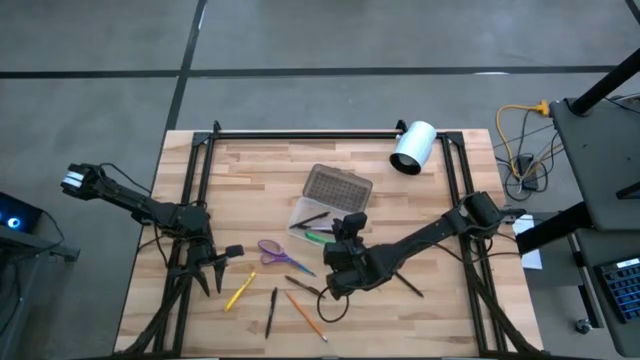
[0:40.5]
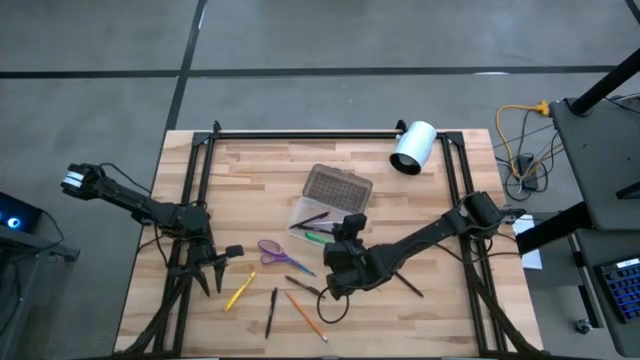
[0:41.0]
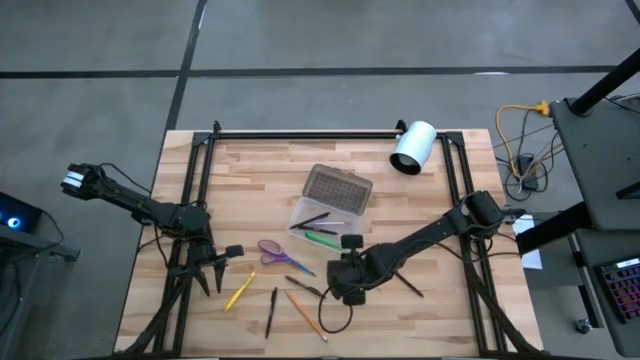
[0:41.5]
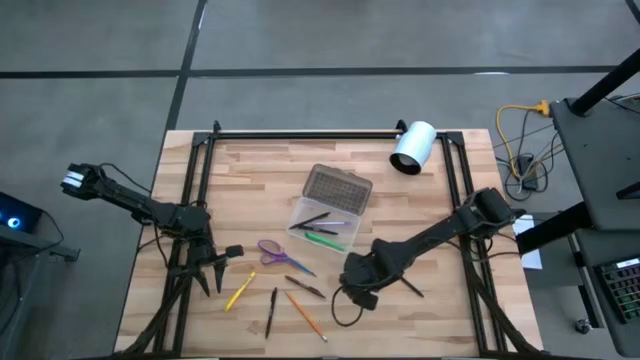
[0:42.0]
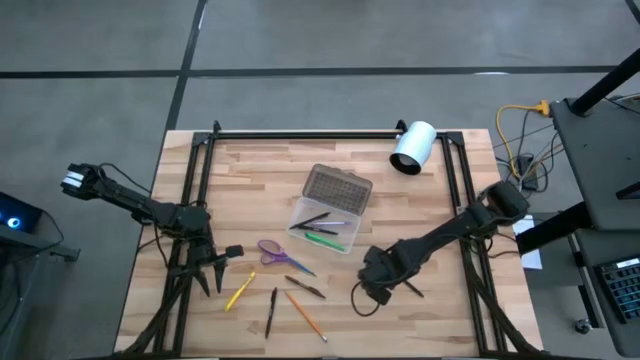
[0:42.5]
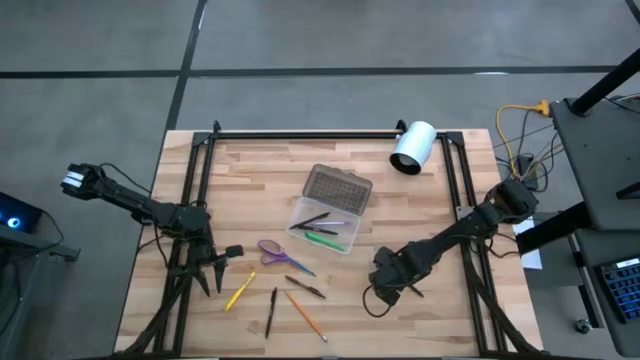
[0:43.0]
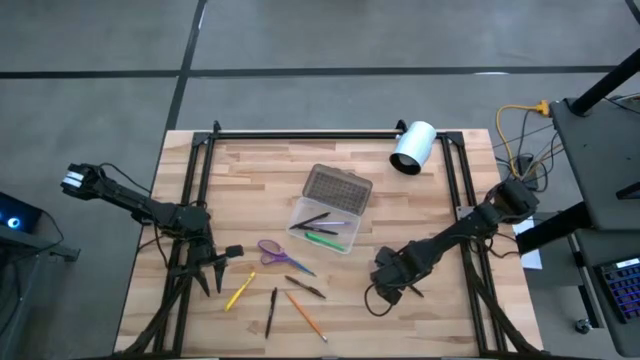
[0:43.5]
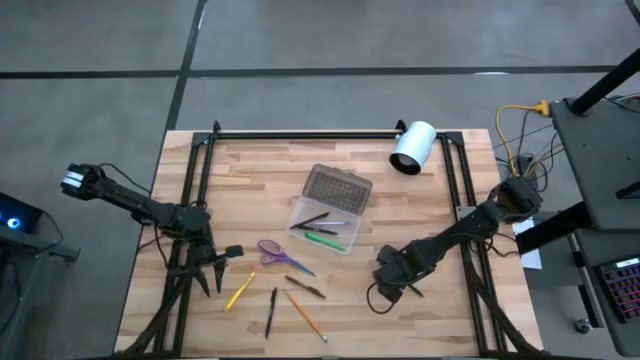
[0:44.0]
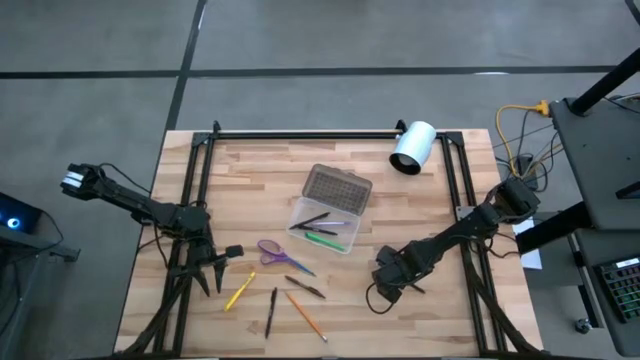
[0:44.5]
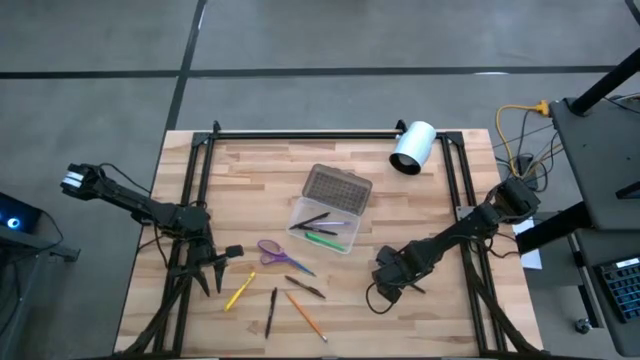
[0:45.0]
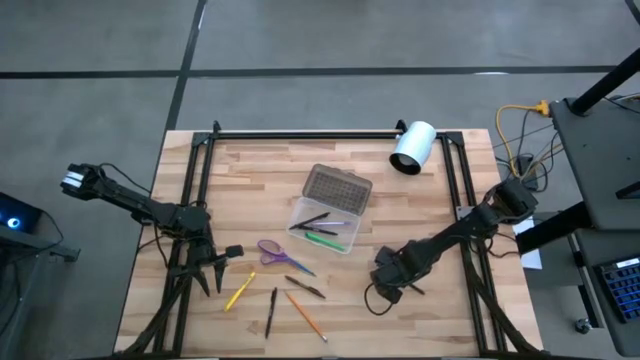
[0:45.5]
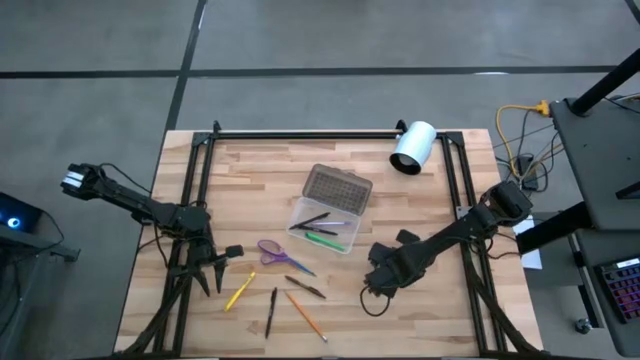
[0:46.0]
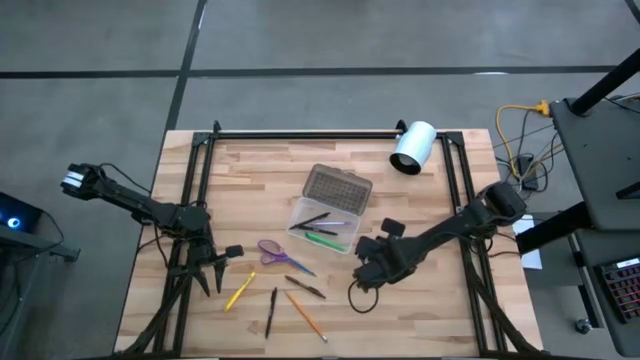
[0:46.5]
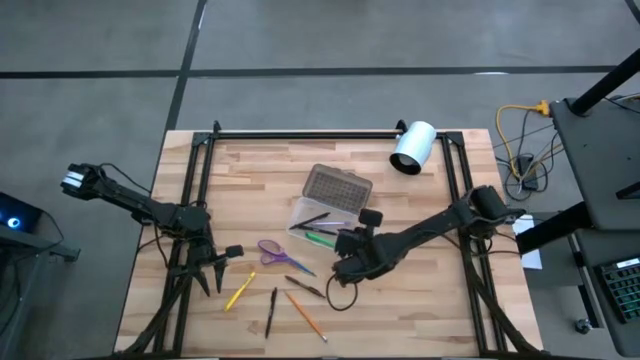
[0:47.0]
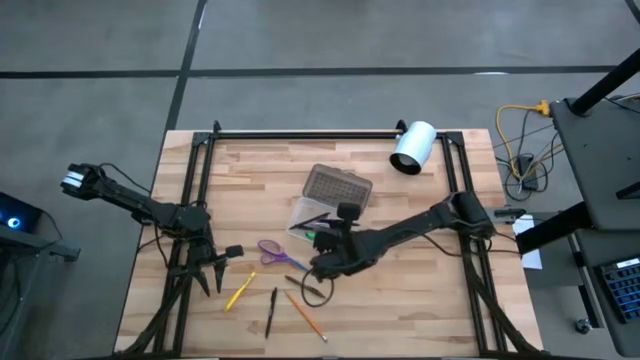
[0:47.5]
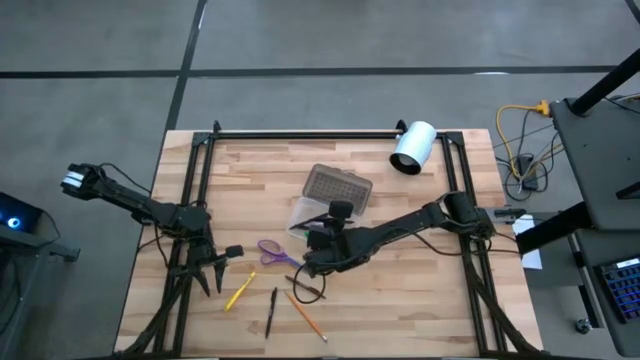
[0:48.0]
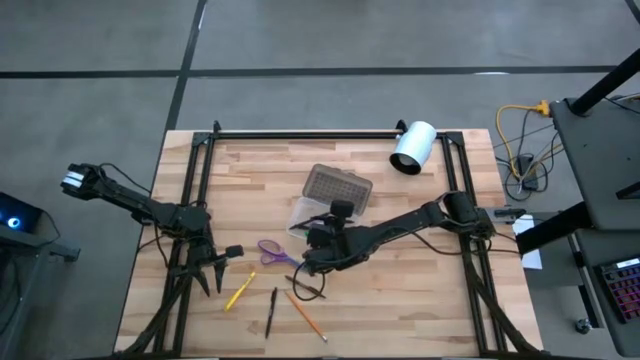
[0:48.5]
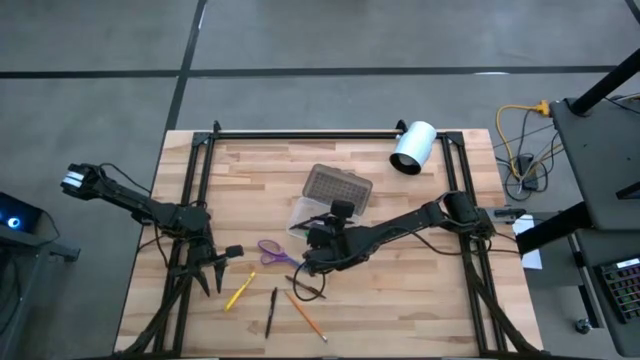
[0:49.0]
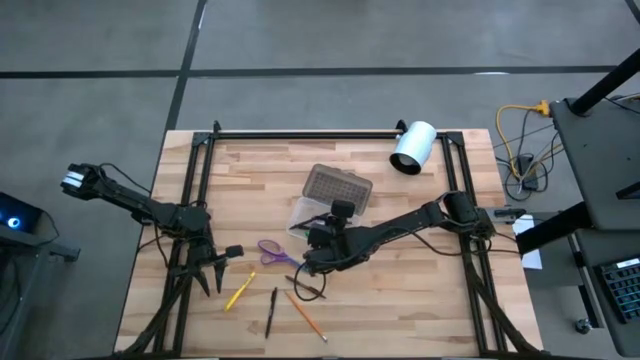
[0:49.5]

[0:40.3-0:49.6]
Task: Pick & place school supplies into a supply box
Put the black pen into the supply box

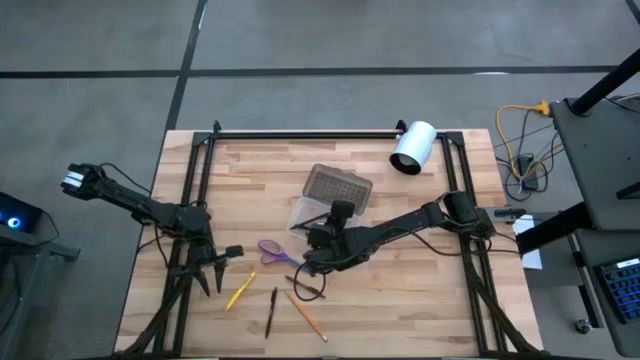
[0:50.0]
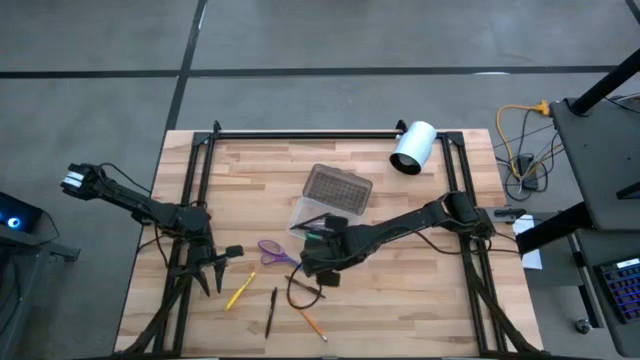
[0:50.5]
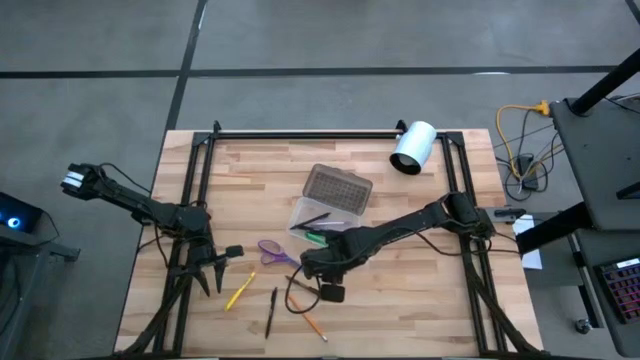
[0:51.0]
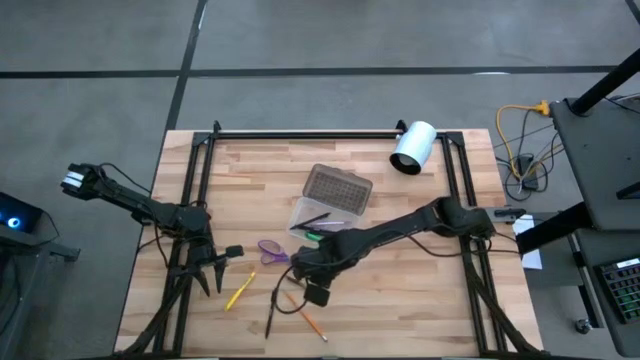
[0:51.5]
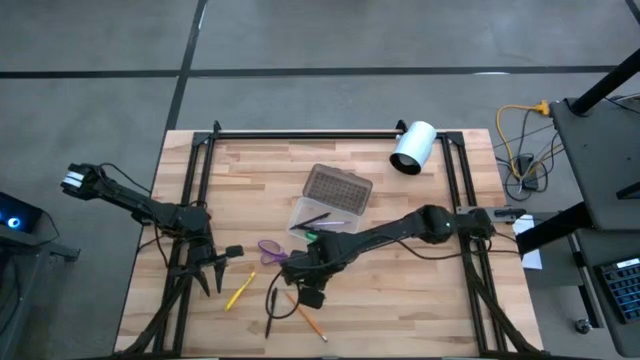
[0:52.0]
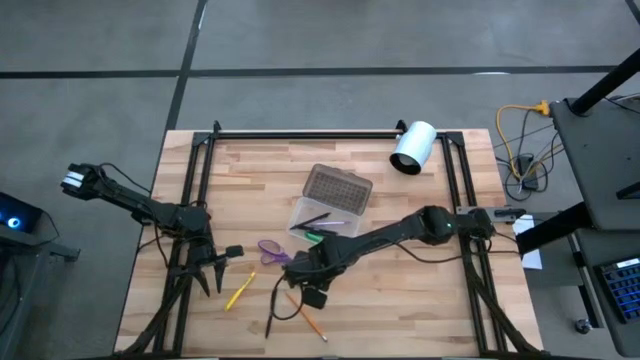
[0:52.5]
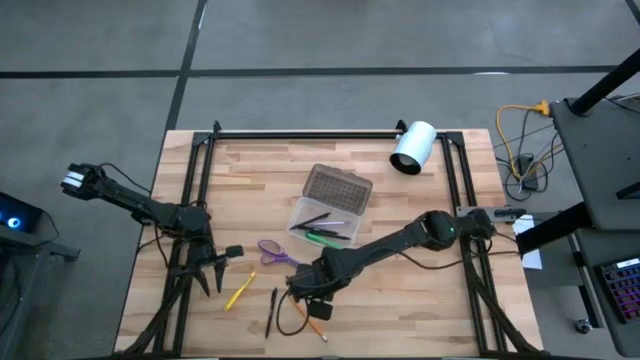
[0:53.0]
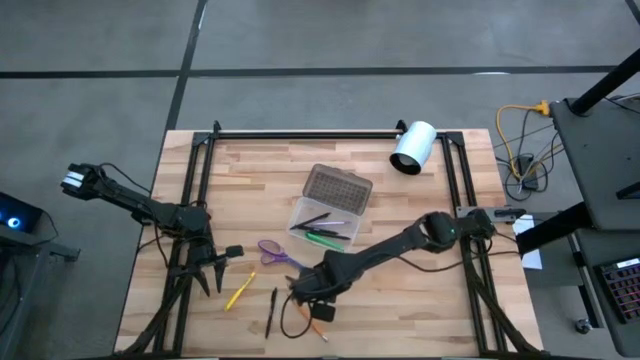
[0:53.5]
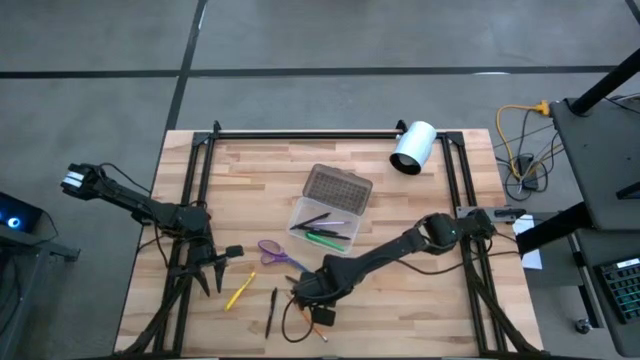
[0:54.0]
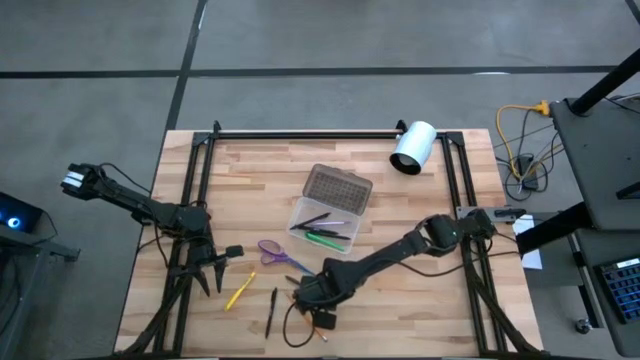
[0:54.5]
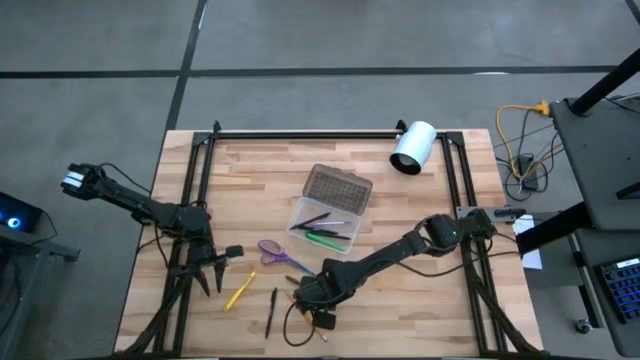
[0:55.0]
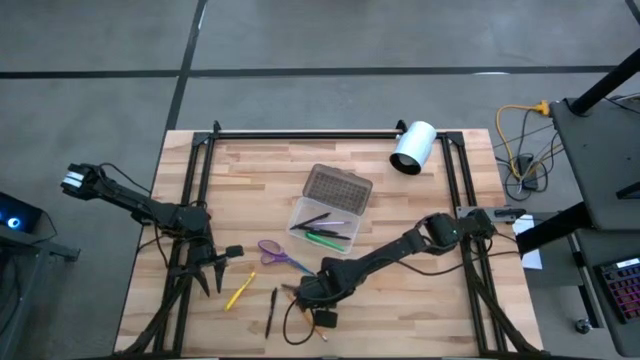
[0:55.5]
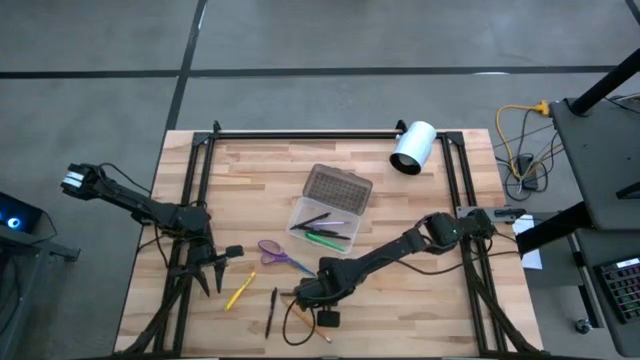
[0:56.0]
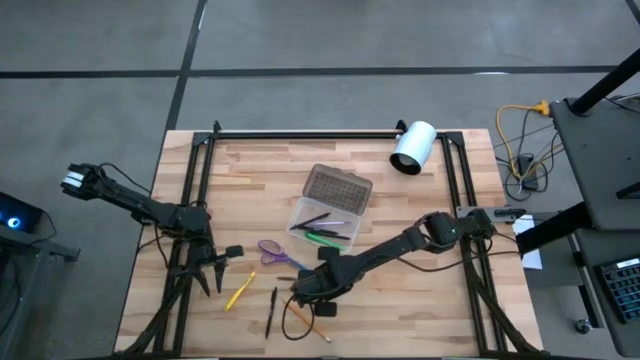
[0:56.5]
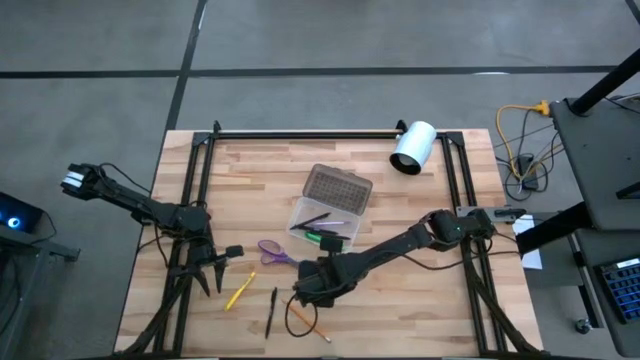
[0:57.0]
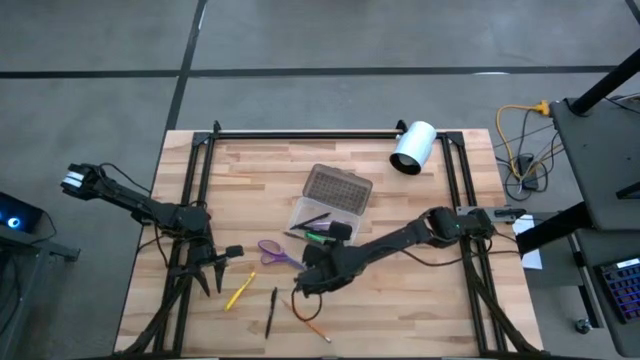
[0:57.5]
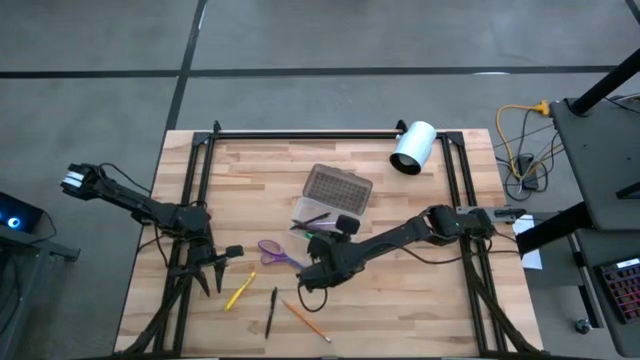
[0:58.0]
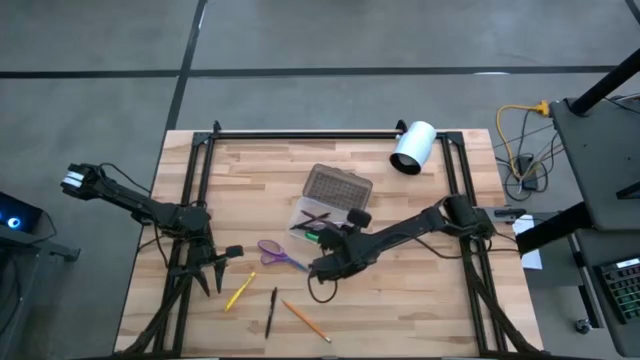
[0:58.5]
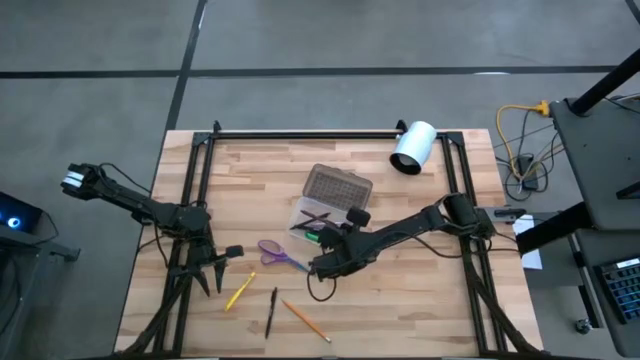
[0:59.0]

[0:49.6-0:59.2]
Put the brown pen into the supply box

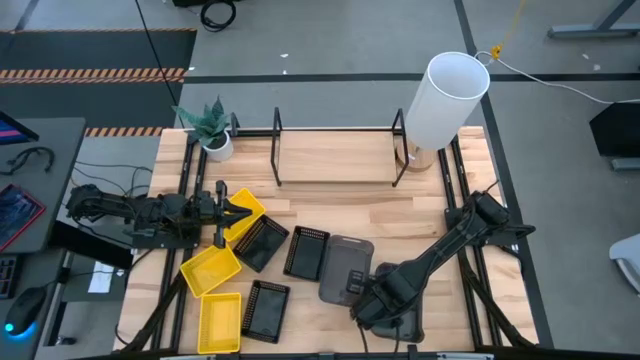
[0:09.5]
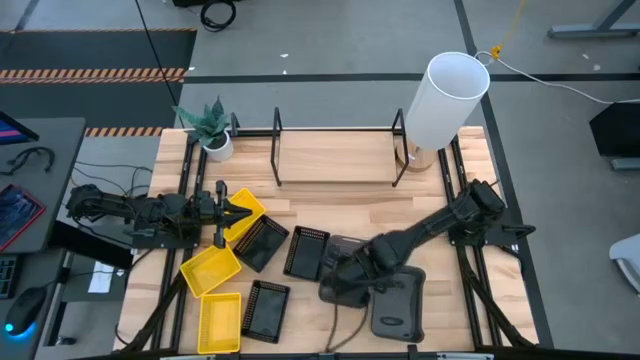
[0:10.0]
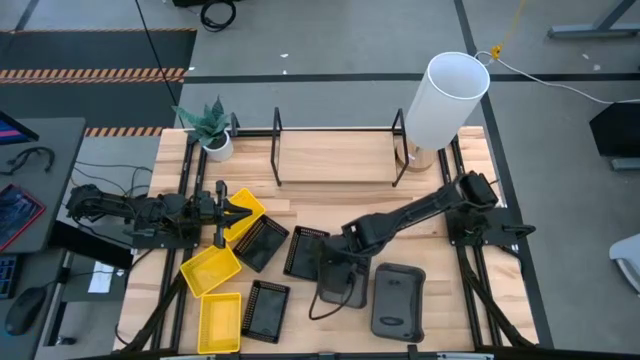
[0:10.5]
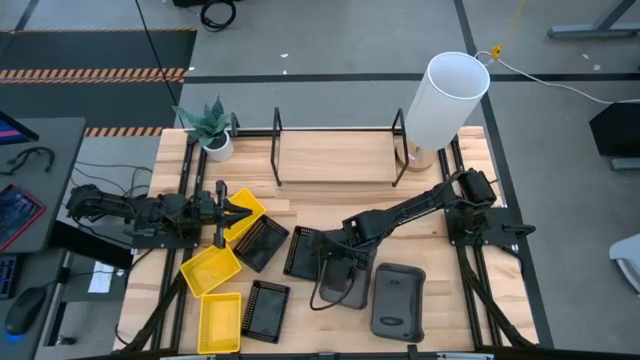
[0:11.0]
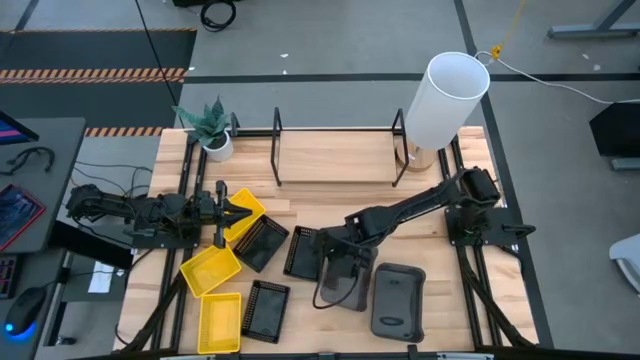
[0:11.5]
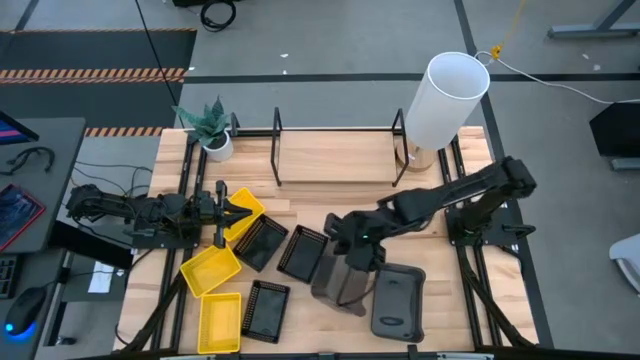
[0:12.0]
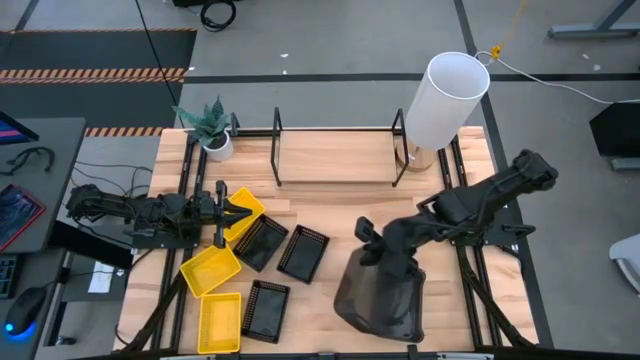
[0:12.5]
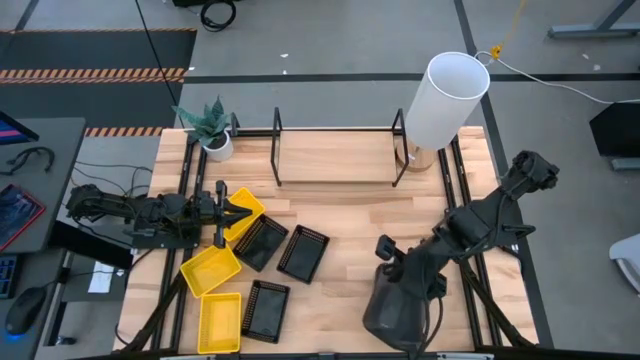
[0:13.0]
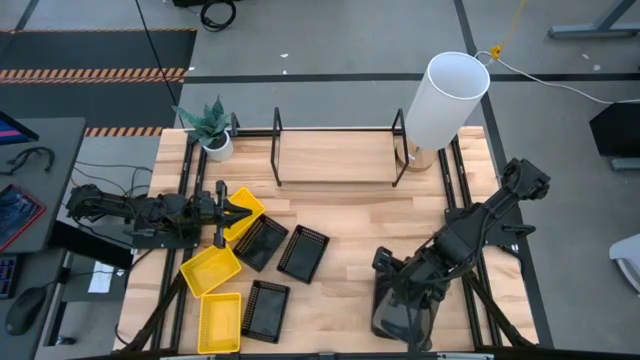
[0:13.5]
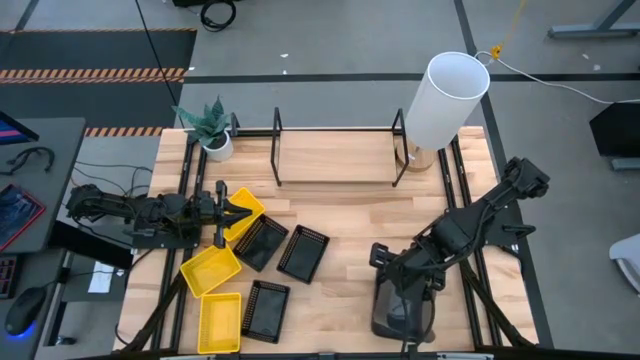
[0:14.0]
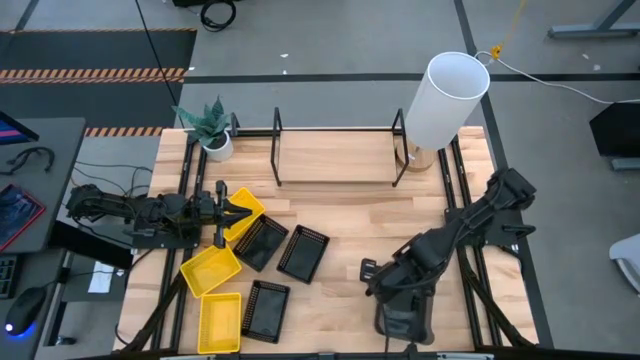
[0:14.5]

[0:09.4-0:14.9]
Task: Stack baskets on shelf by color
Stack the left black bin on top of the right gray stacked bins
